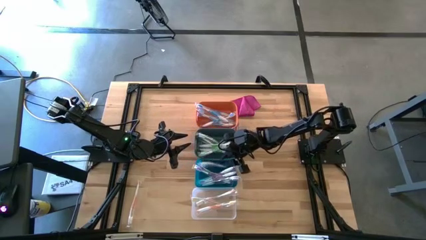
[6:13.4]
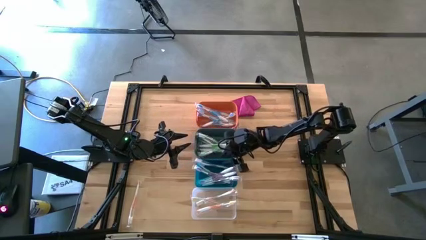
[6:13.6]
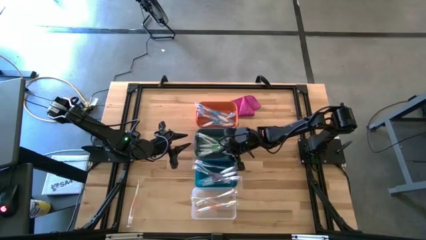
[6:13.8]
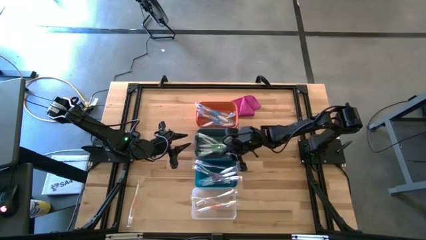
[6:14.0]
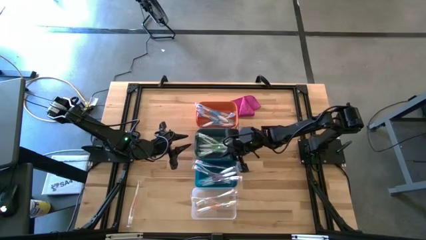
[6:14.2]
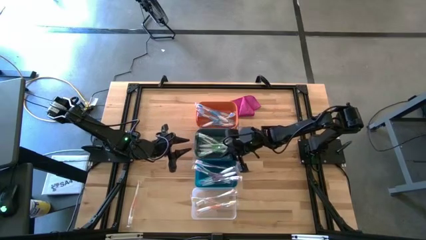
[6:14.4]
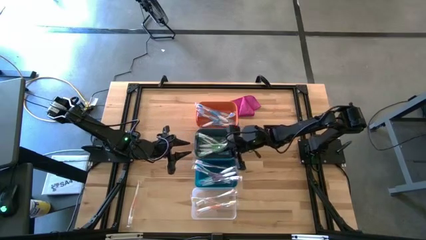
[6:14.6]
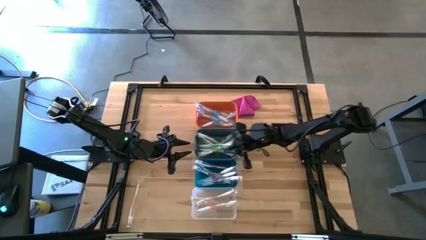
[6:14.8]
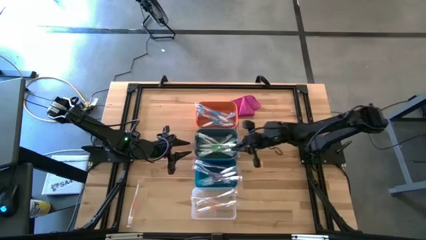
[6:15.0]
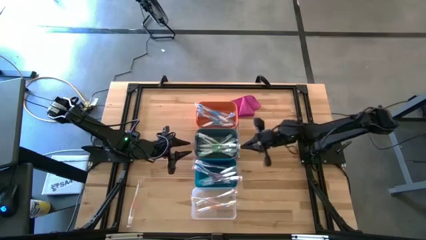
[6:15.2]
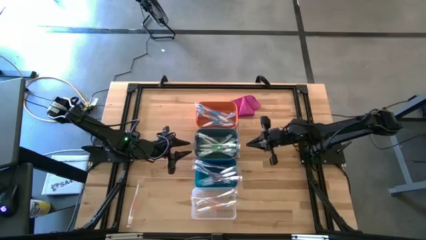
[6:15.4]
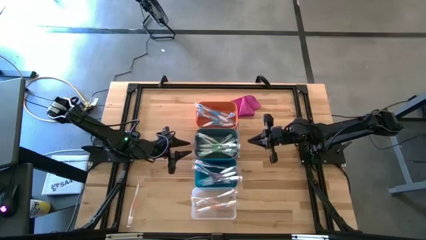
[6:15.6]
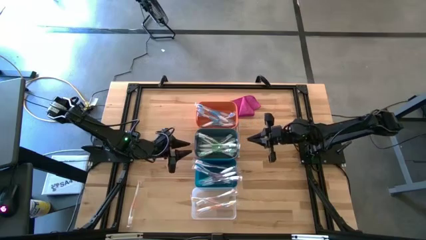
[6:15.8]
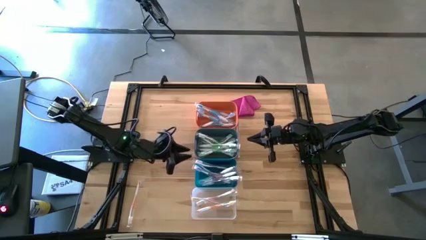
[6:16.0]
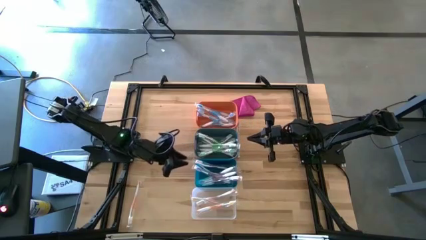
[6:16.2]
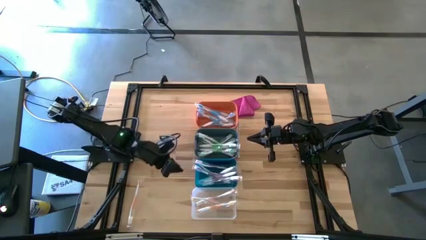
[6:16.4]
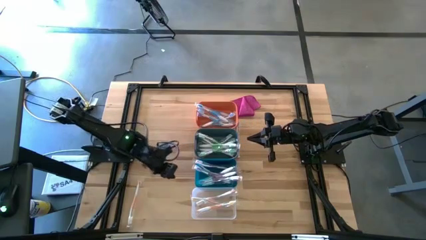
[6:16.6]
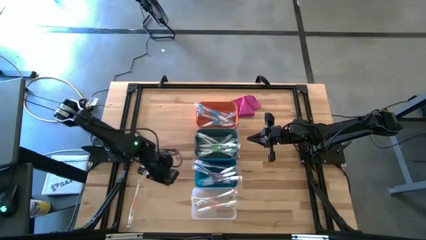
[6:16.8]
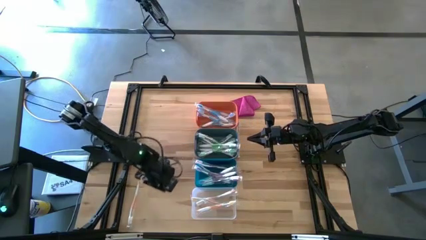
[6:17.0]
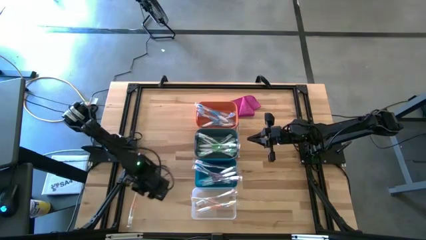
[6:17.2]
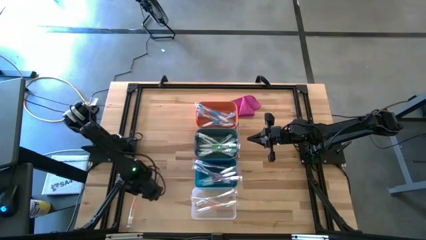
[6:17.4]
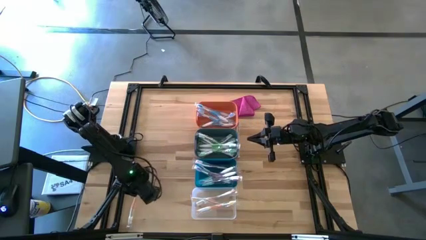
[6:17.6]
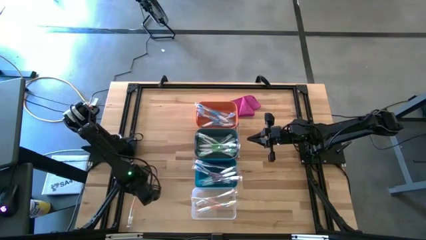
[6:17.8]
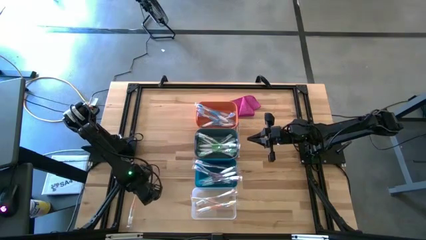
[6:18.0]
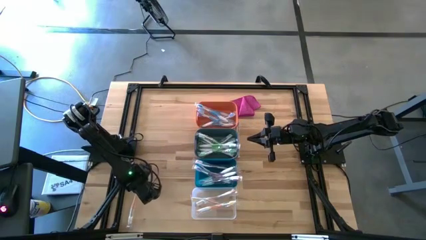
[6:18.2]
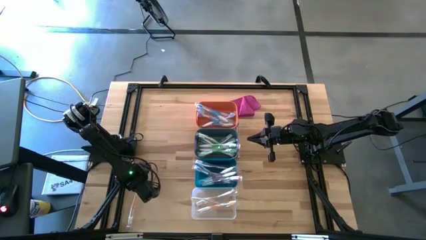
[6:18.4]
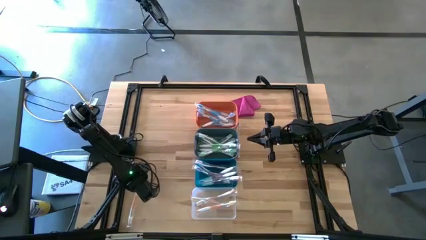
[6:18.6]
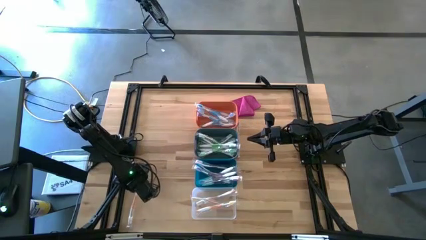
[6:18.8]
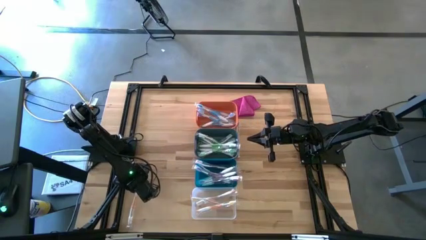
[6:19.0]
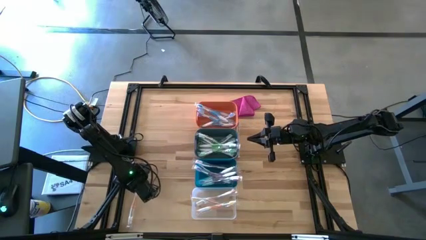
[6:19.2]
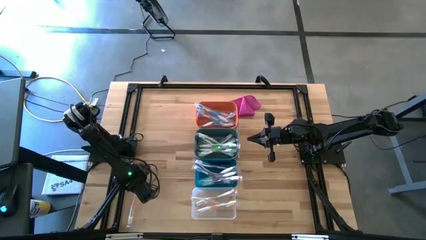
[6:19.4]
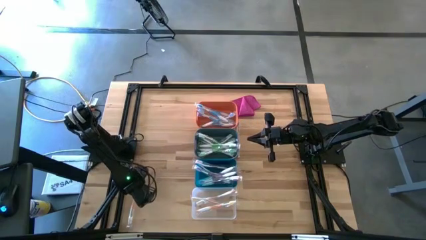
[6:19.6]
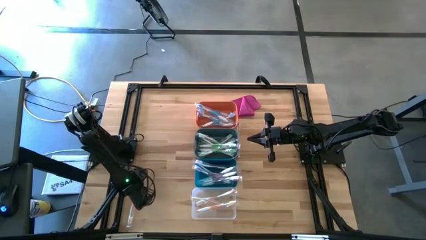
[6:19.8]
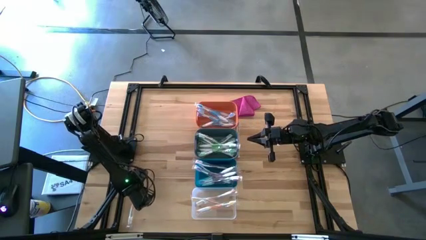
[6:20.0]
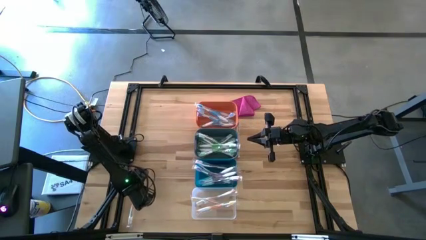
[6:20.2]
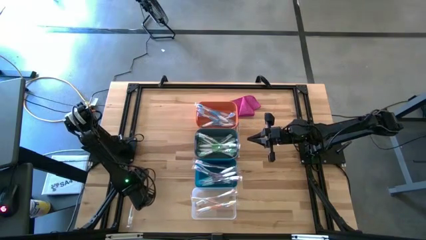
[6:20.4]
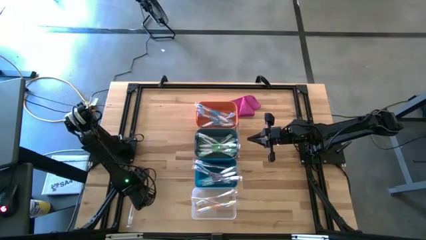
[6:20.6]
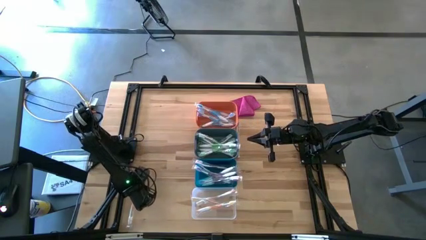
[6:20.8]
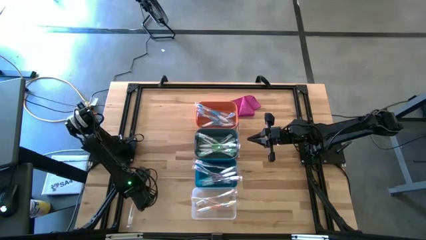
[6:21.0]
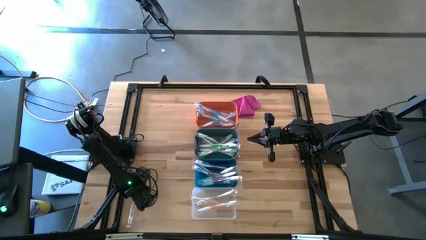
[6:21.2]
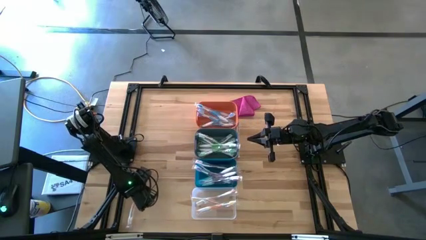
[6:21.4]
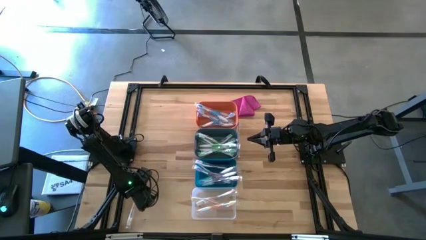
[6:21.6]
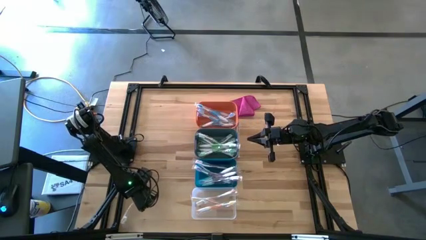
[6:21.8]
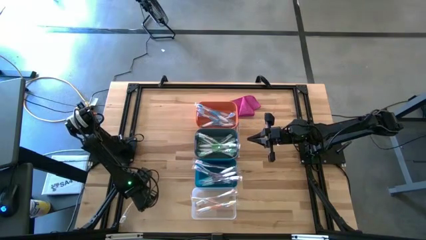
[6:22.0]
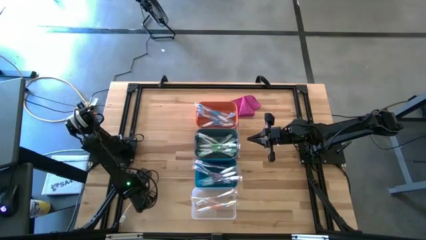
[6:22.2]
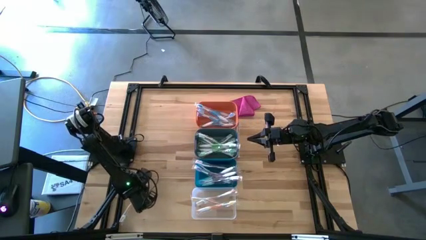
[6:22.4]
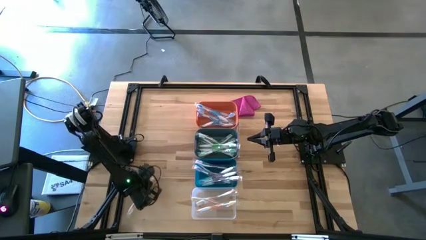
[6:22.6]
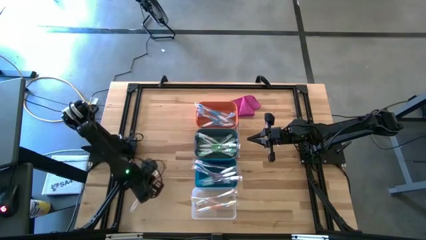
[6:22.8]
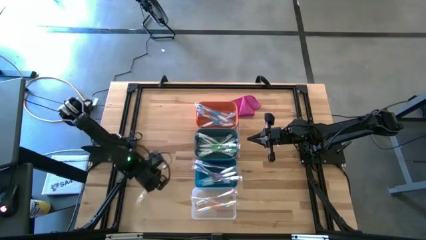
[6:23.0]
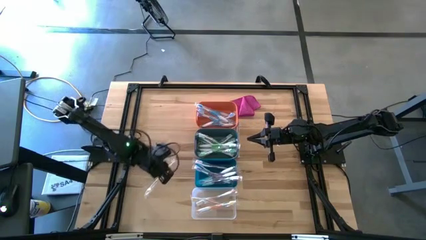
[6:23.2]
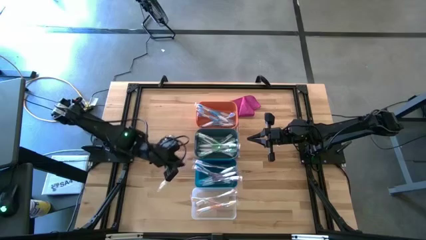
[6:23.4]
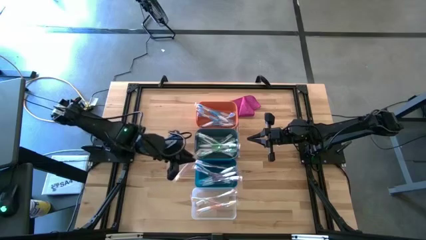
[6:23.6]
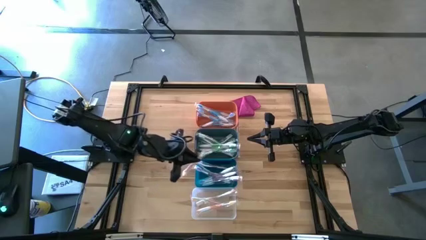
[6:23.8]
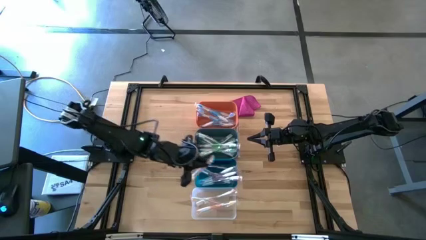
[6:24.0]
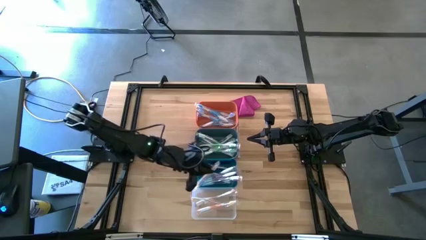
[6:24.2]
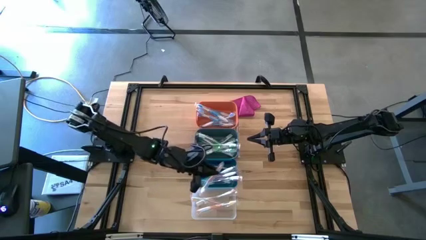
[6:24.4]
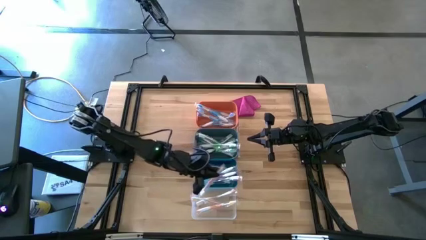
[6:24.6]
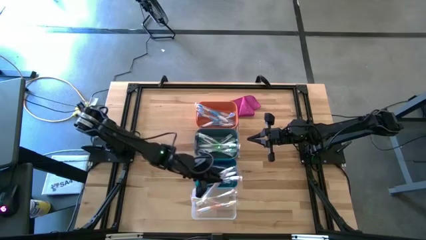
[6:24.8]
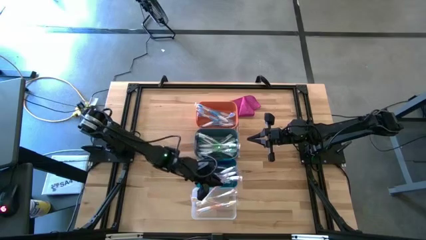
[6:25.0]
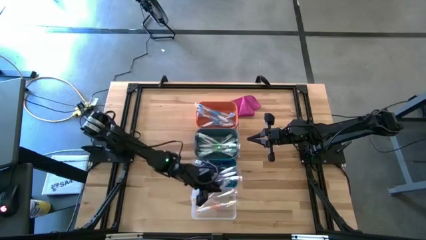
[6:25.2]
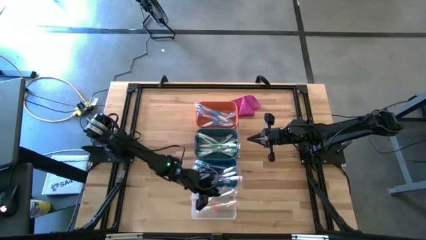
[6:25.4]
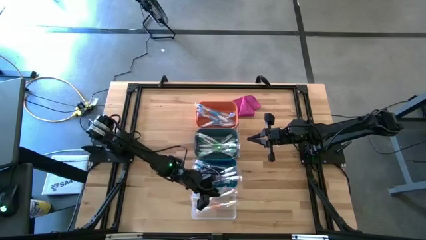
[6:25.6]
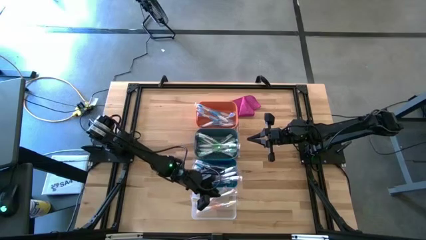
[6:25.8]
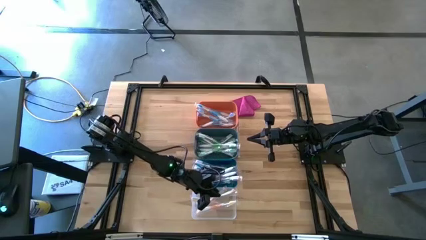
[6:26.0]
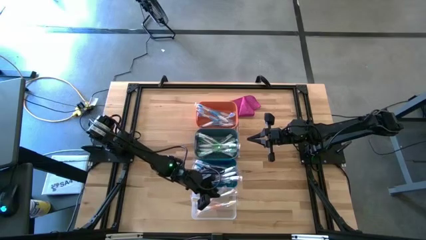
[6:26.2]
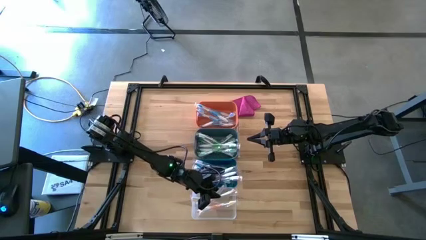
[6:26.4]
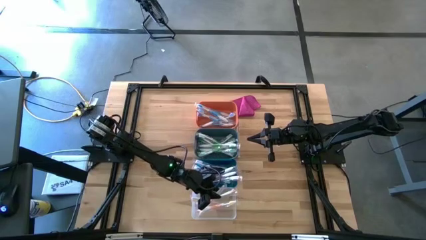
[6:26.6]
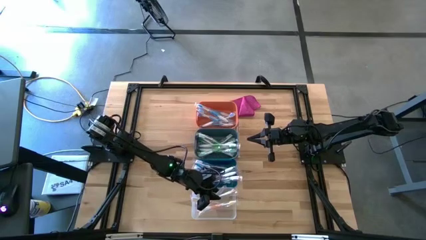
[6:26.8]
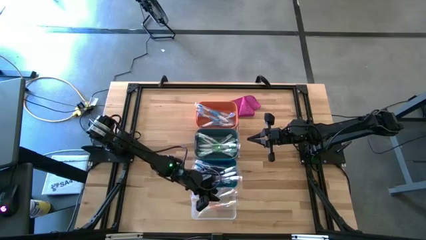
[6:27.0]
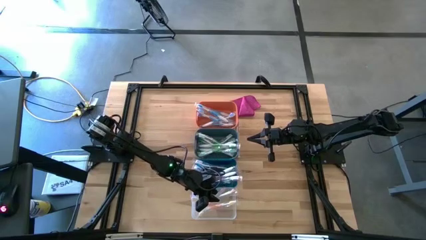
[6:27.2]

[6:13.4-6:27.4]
Task: Pick & Place Toothbrushes
Put the orange toothbrush into the transparent bin

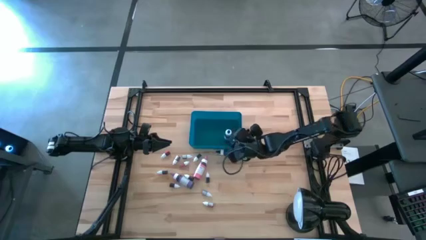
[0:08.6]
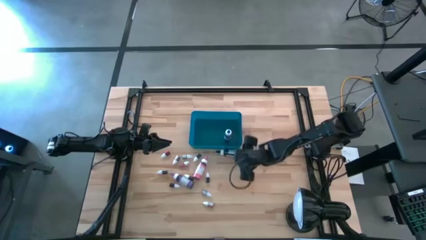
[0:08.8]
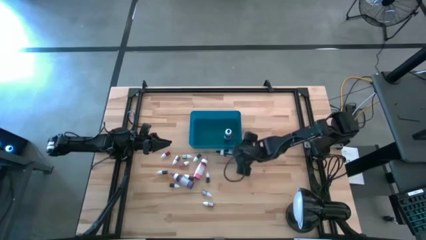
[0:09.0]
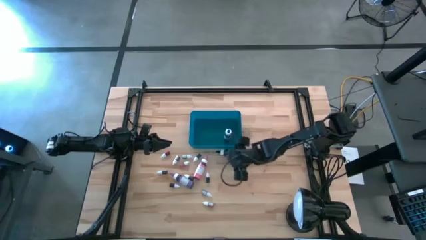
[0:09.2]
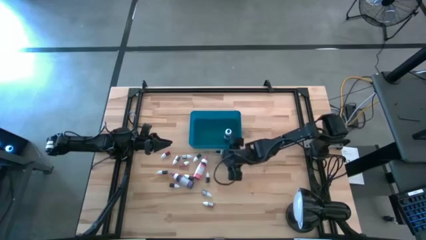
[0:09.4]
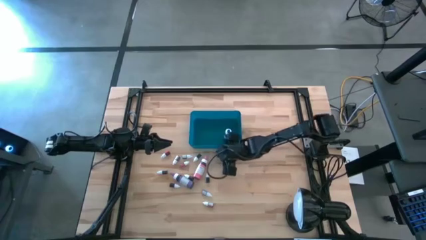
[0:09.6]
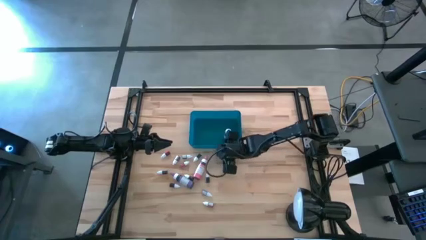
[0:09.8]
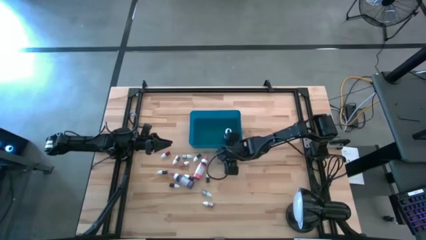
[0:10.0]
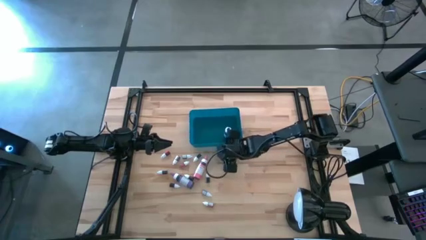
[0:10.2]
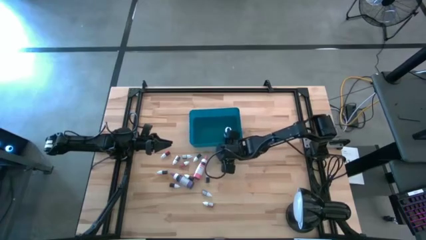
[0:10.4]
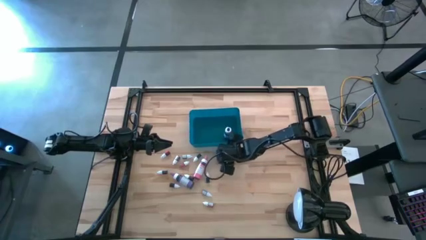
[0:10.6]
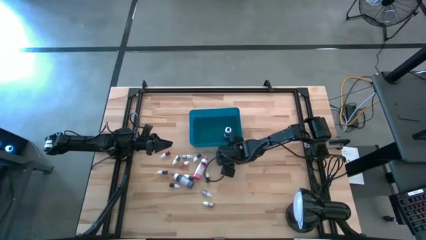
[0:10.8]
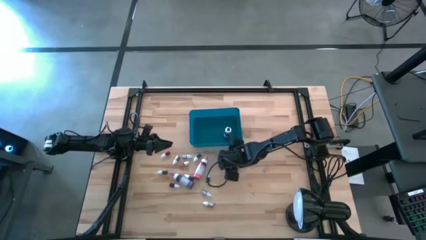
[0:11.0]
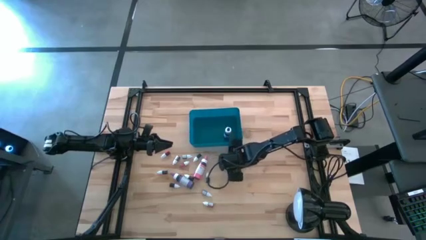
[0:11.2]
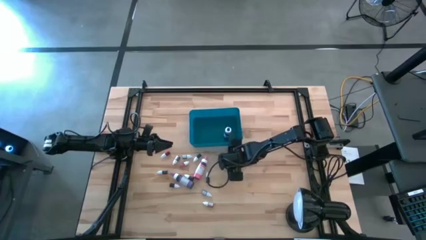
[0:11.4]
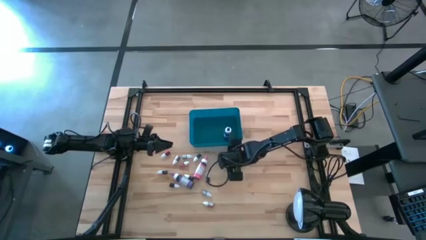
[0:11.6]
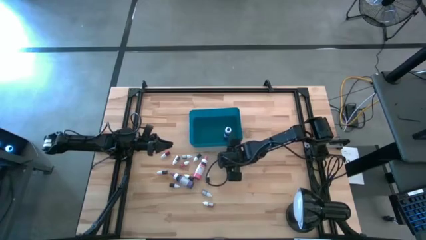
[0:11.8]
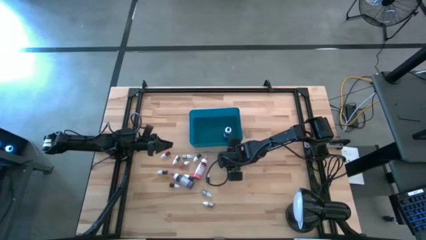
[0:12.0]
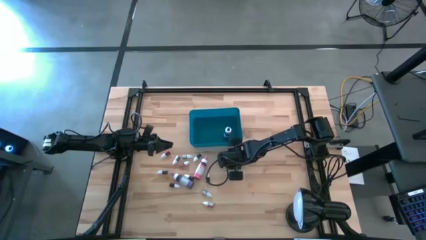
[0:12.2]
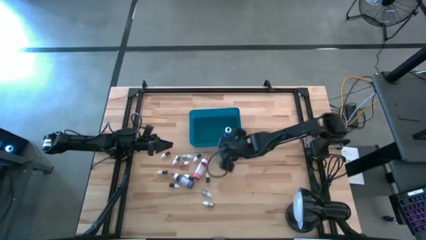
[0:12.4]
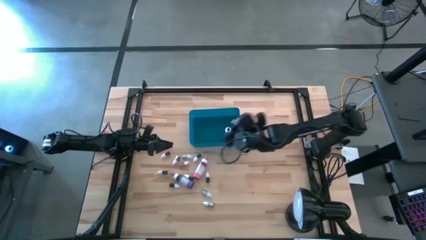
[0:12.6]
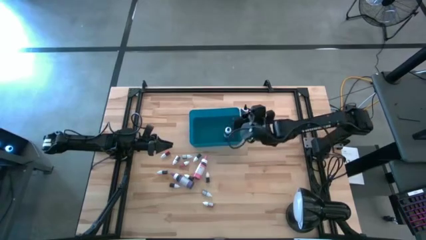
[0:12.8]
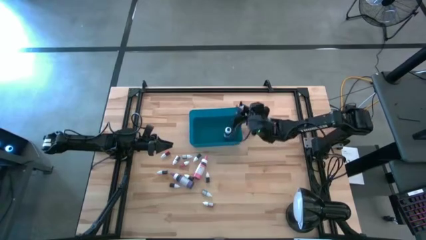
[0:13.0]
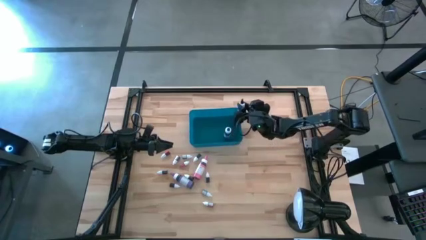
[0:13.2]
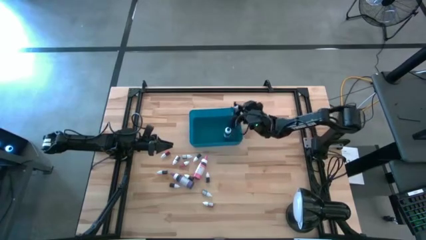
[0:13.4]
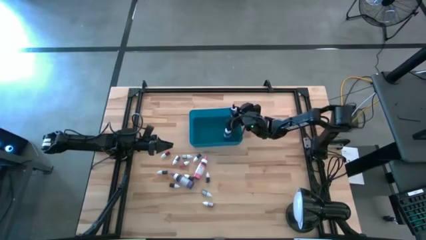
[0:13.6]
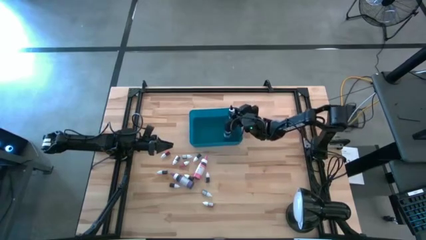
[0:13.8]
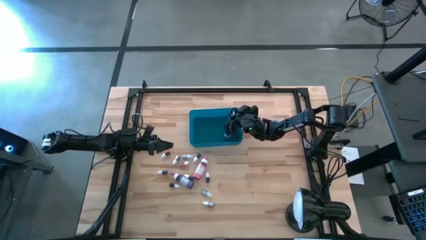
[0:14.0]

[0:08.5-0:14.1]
Task: Pick & Place food coloring
Put the large black food coloring bottle into the bin
